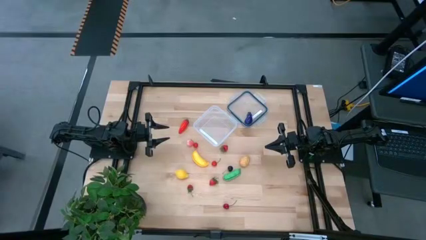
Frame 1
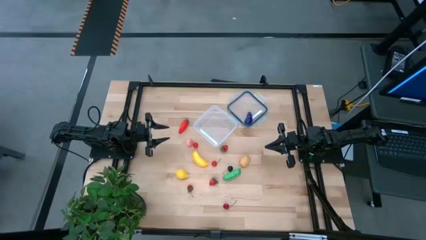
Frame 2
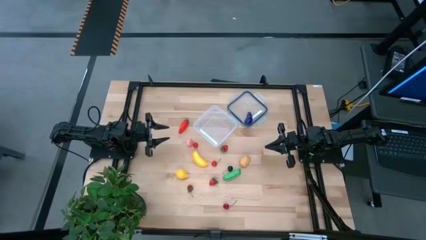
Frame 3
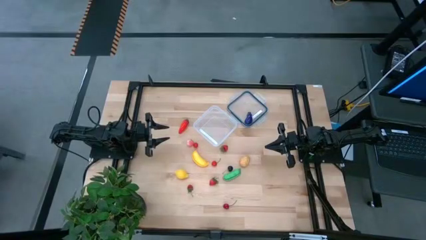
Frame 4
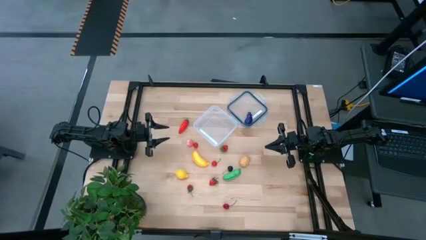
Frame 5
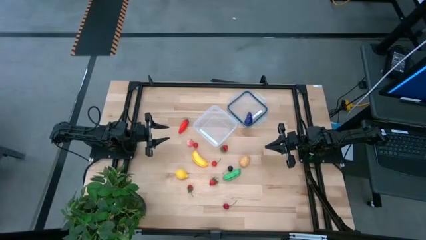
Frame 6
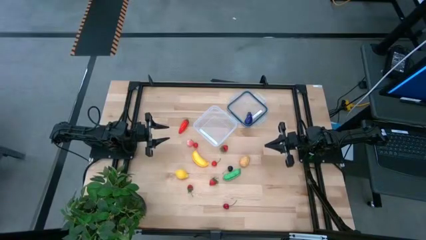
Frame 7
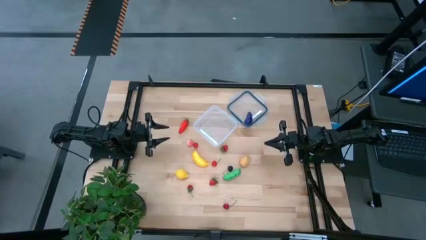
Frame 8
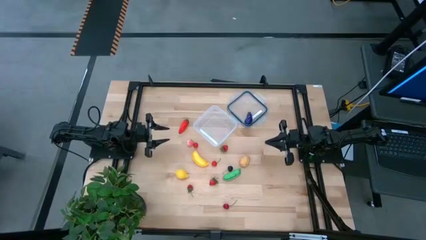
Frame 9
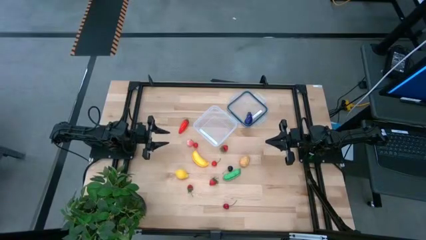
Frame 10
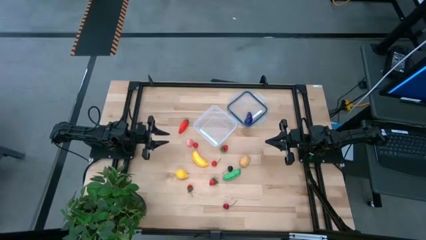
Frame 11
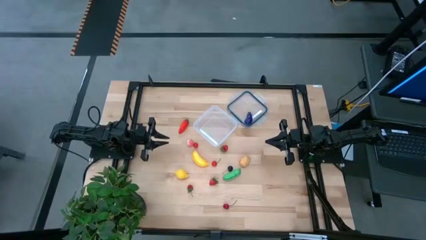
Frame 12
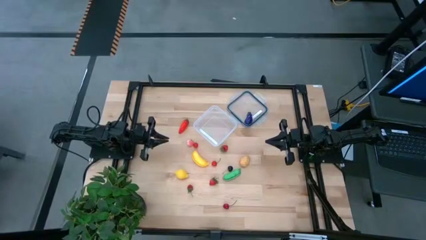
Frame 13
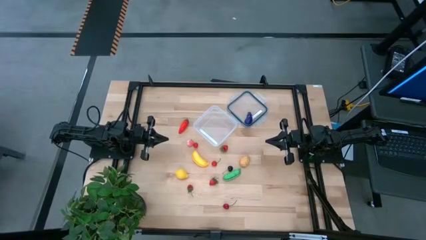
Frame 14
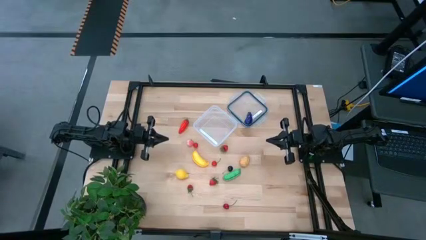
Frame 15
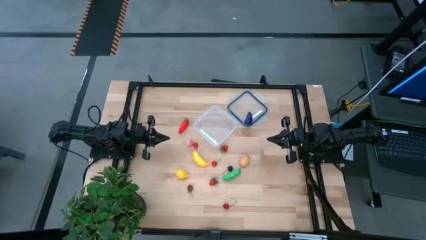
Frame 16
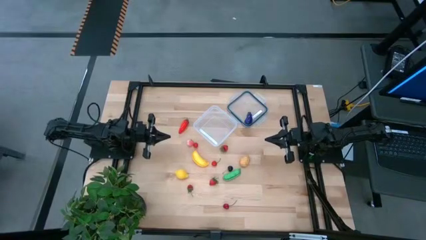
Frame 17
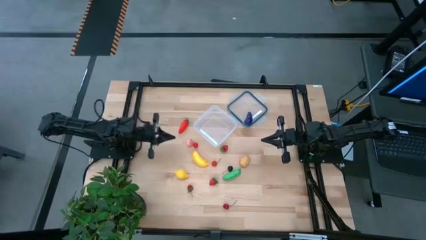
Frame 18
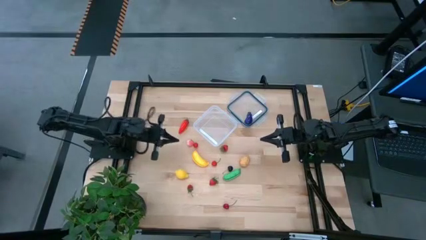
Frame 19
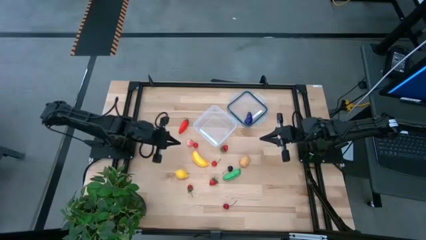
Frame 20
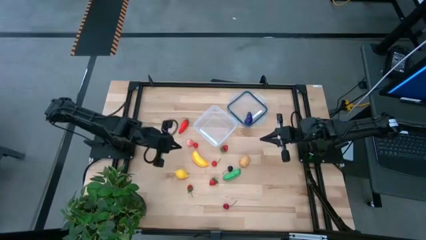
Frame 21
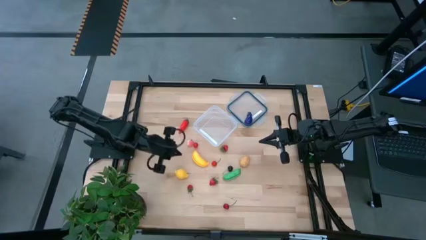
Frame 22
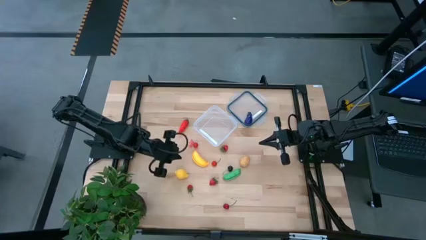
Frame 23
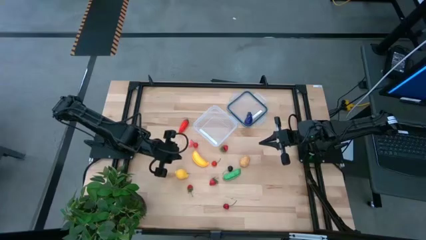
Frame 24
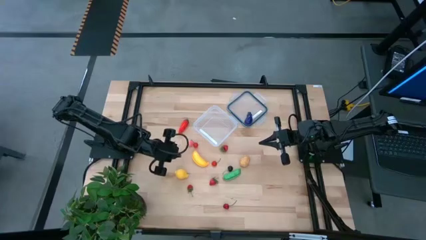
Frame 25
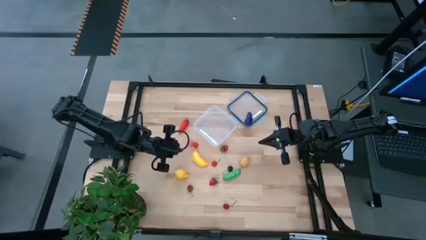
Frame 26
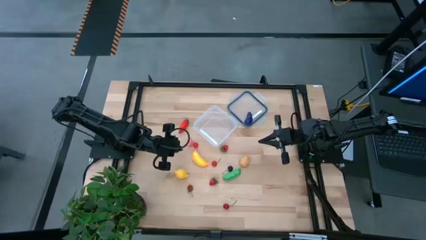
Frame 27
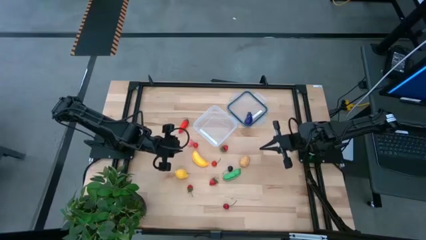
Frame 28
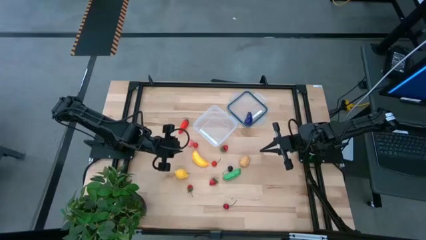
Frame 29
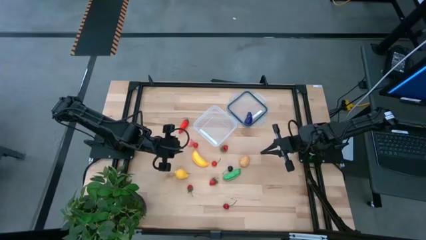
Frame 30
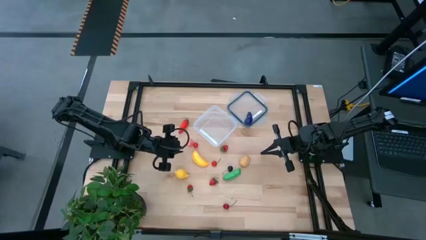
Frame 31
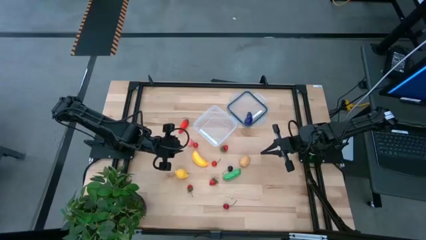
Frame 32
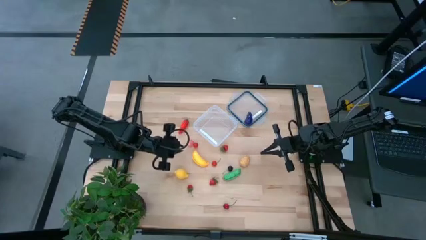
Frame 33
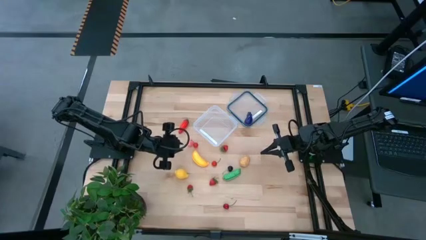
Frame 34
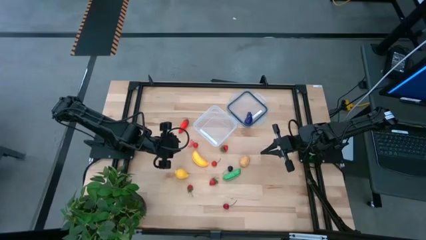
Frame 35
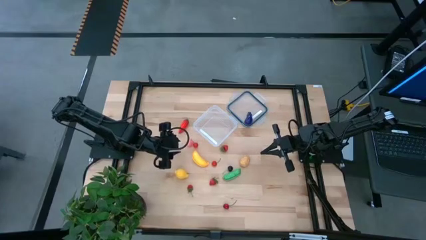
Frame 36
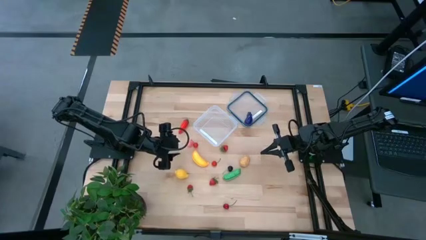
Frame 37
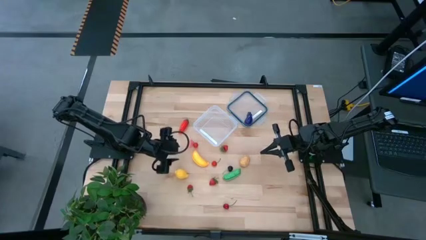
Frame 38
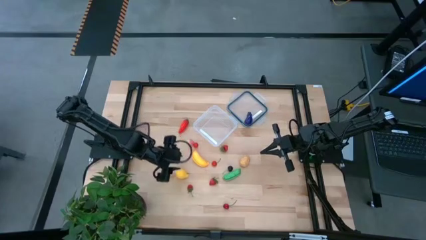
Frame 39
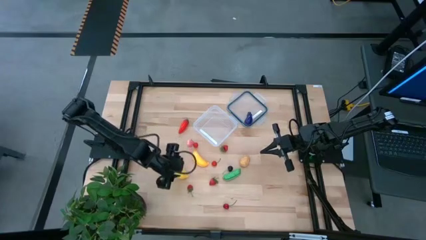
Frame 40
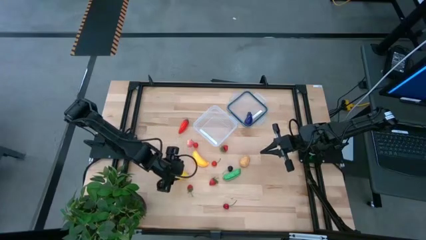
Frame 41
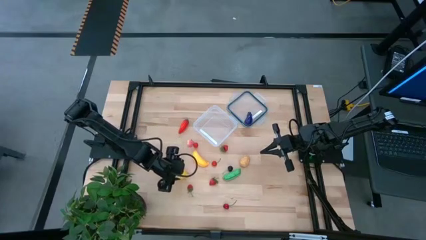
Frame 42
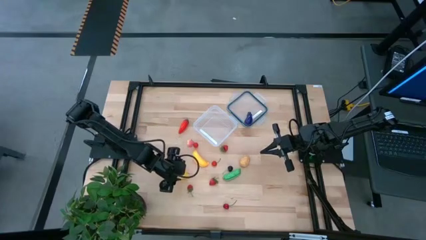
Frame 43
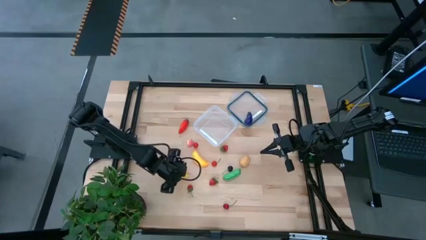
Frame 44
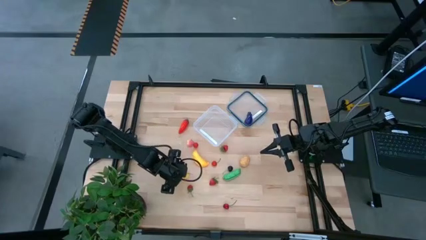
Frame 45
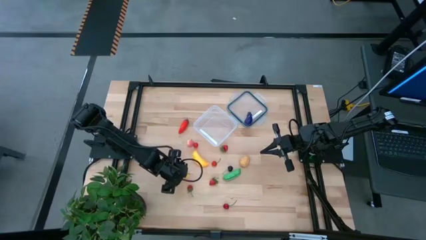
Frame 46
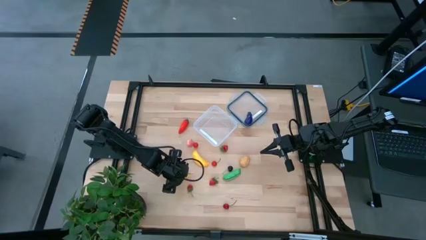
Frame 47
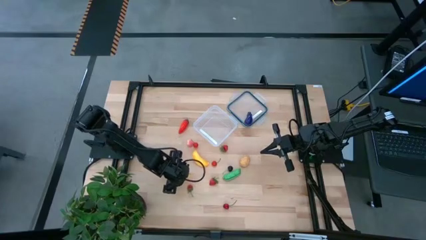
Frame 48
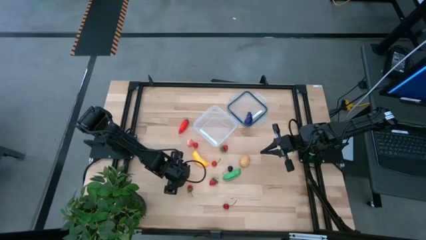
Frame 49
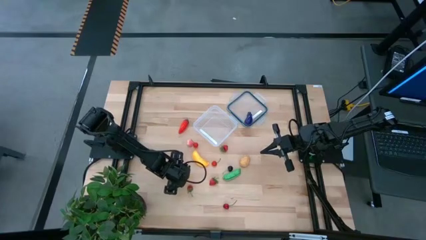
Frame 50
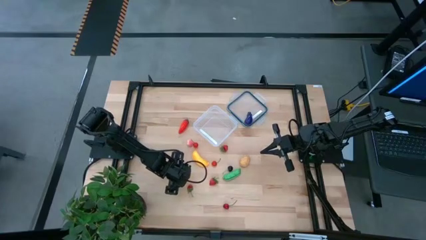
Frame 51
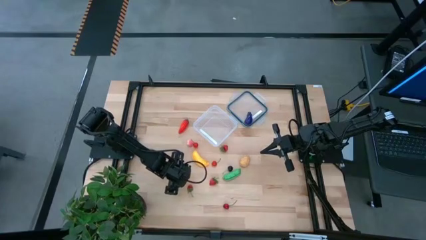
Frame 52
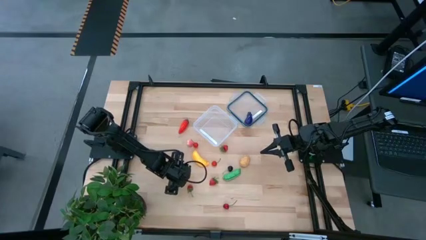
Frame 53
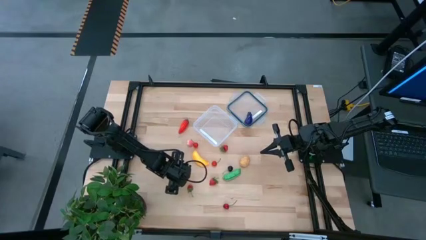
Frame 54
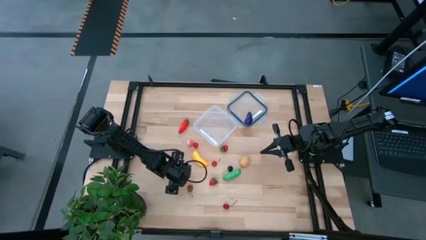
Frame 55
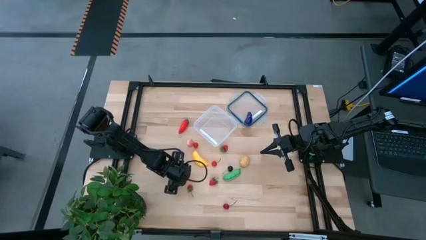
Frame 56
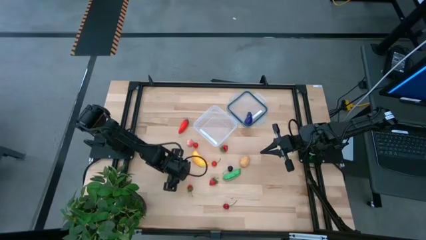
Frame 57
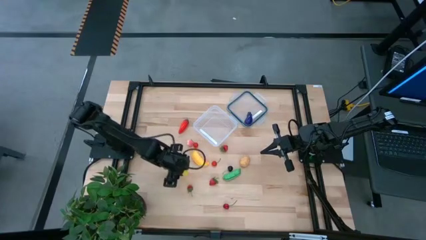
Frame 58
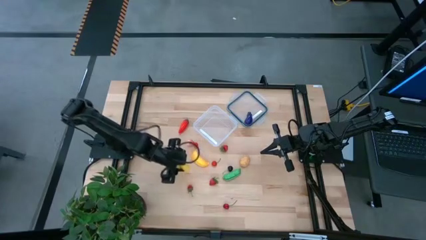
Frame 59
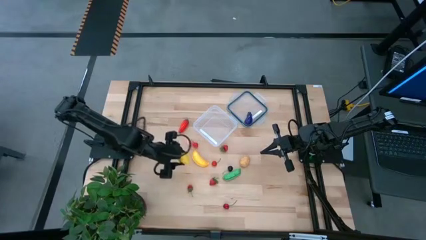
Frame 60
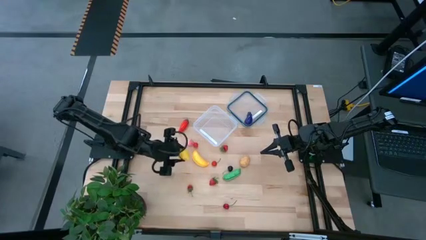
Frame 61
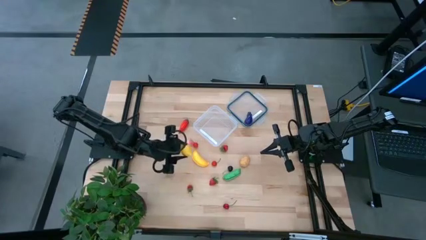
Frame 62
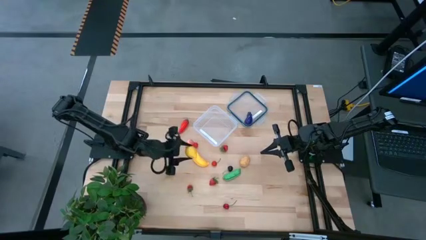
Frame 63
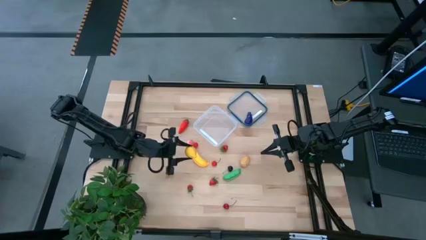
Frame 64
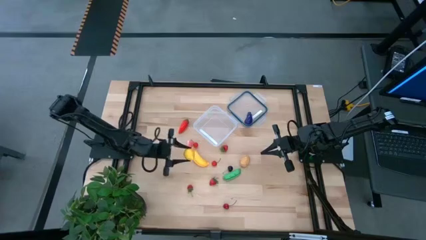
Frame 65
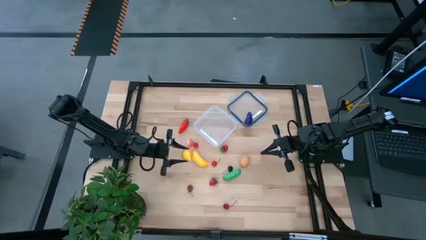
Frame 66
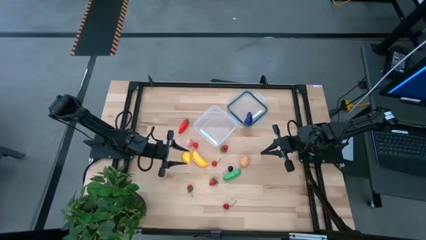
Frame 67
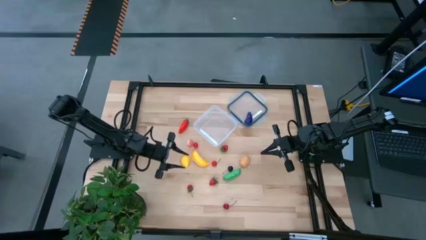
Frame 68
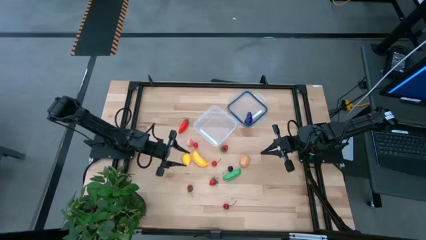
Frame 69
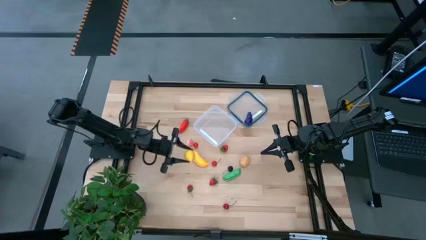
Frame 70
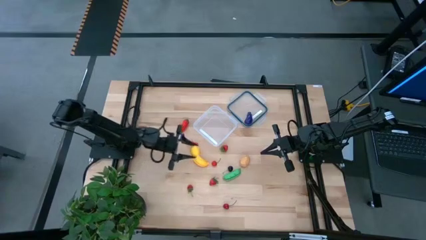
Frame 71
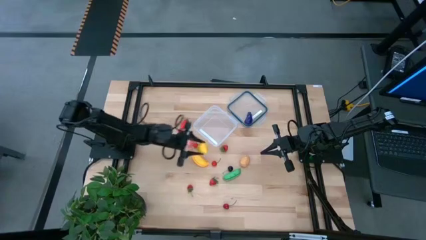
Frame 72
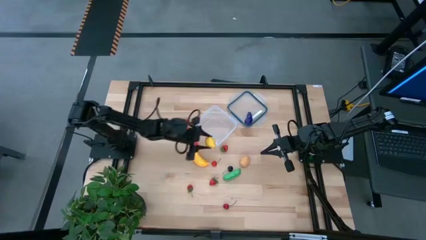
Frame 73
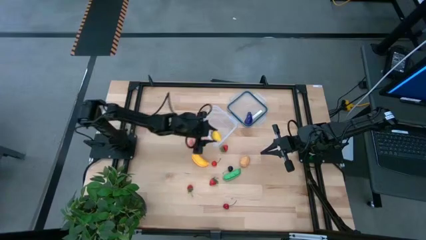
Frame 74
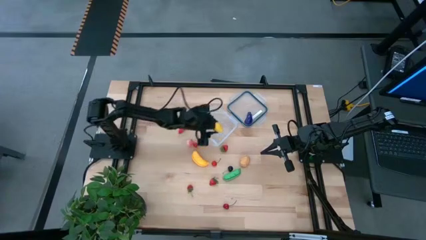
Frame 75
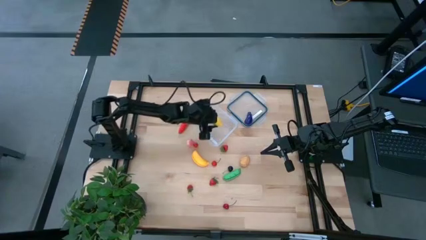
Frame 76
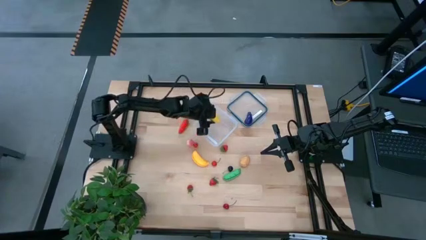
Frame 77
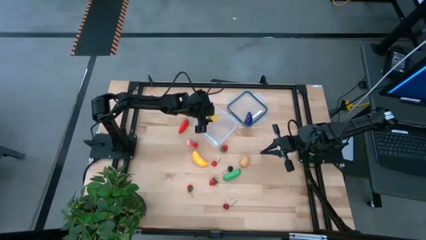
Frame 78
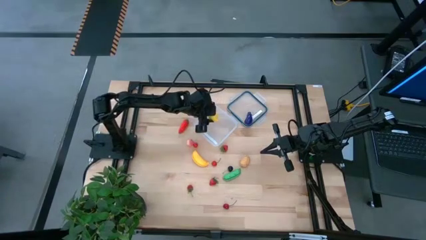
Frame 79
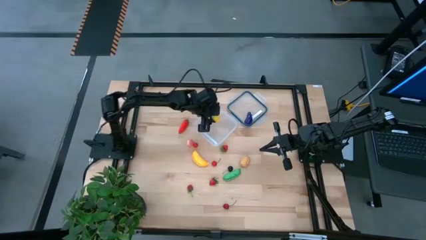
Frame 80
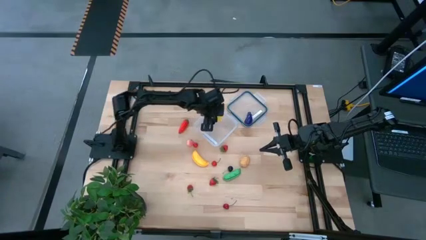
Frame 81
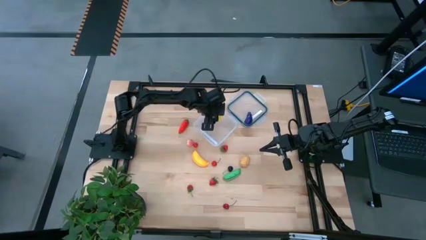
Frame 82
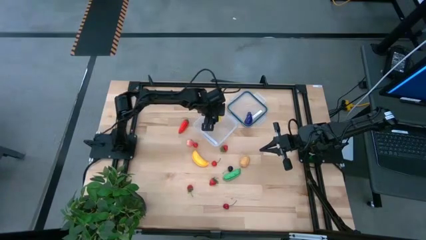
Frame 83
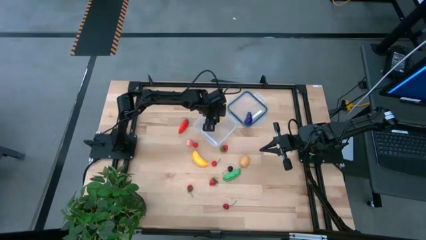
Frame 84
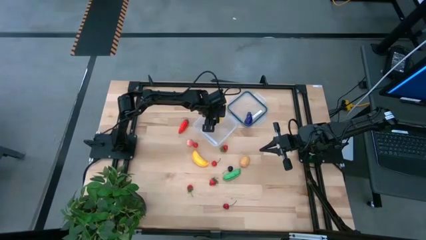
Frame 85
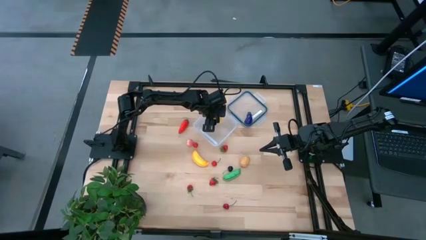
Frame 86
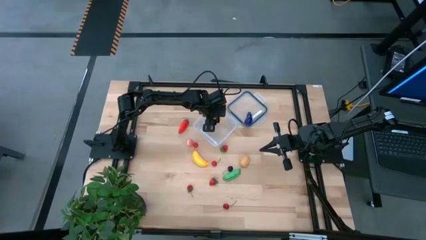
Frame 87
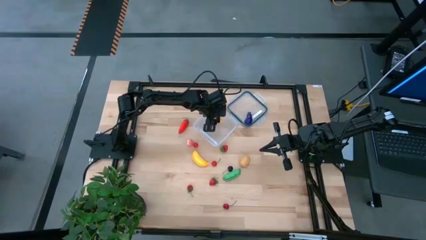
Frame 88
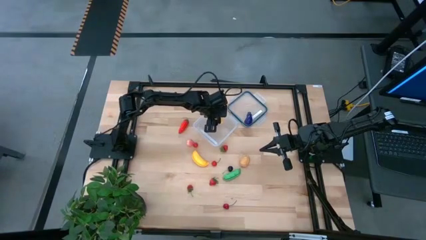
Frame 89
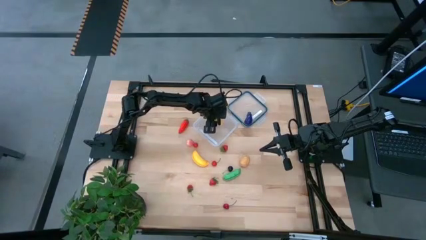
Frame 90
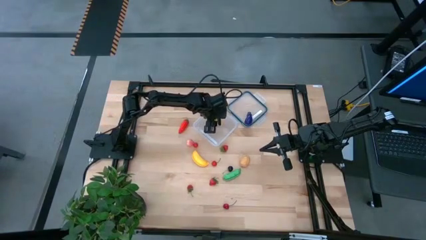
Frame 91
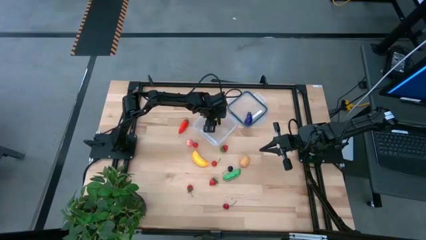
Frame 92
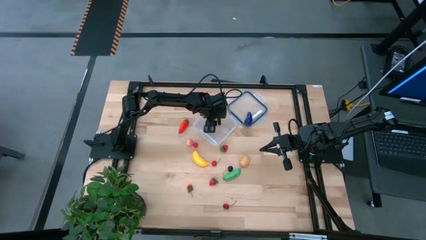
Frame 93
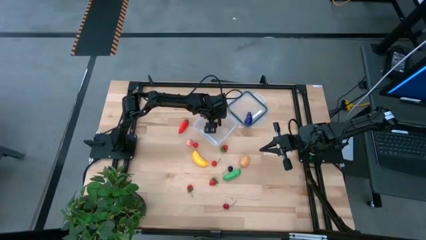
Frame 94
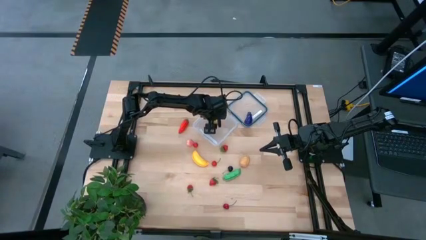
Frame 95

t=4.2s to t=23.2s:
Task: Pick and placing Produce into tupperware
Put the yellow lemon into the transparent container
